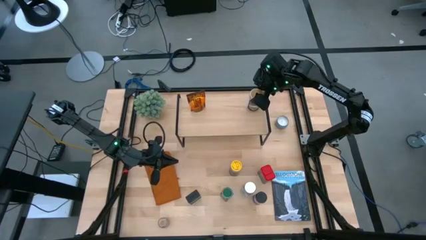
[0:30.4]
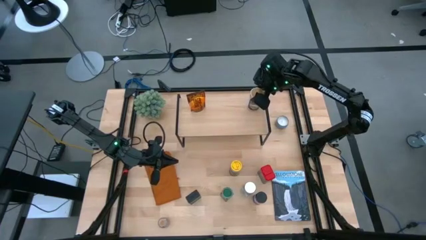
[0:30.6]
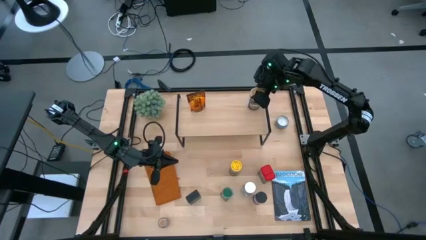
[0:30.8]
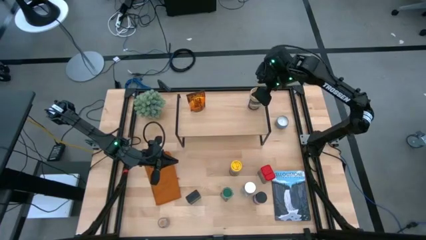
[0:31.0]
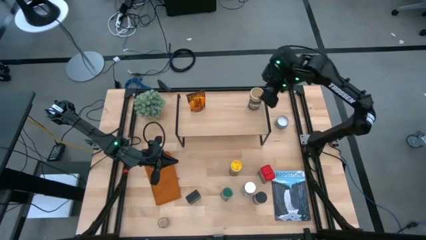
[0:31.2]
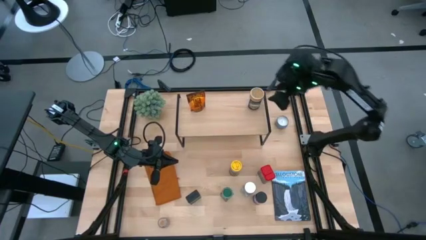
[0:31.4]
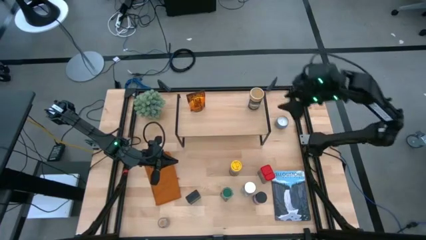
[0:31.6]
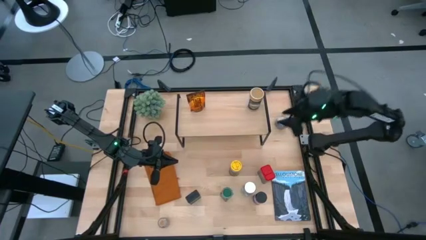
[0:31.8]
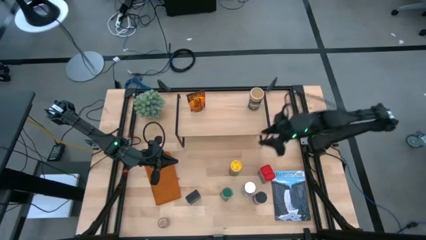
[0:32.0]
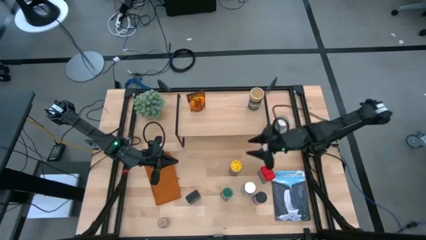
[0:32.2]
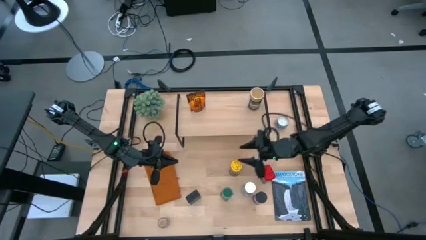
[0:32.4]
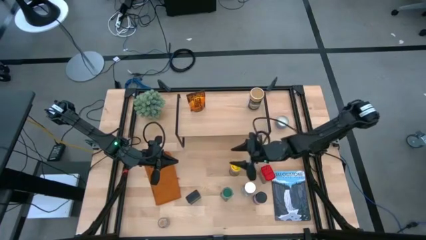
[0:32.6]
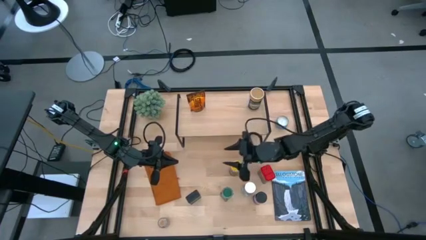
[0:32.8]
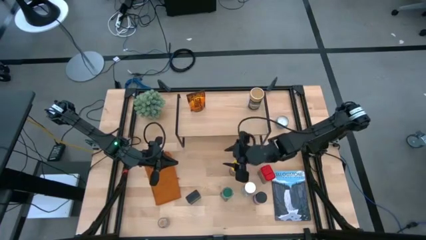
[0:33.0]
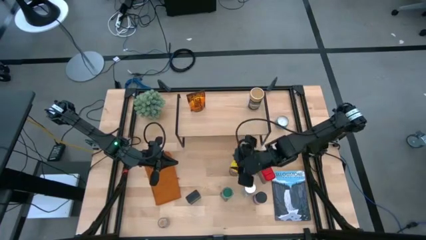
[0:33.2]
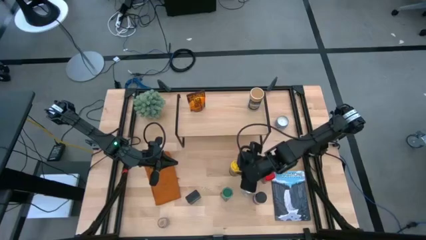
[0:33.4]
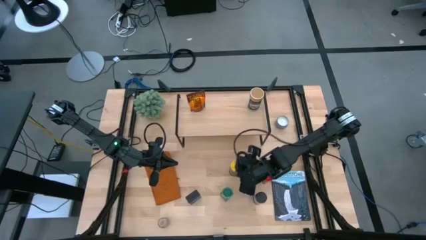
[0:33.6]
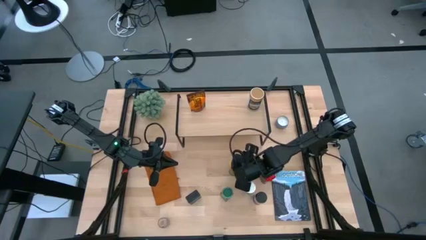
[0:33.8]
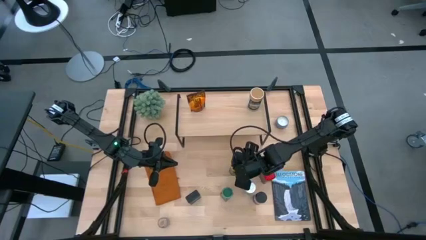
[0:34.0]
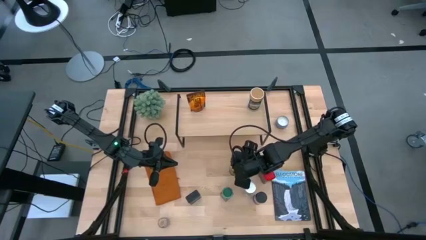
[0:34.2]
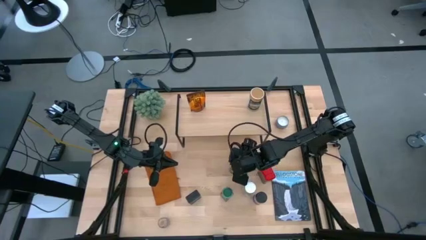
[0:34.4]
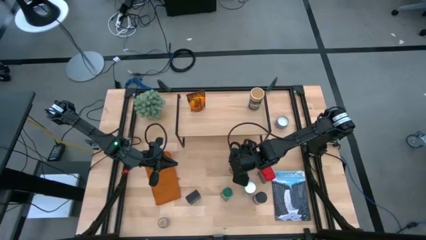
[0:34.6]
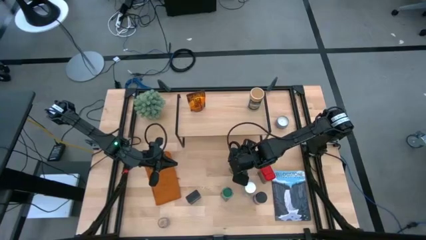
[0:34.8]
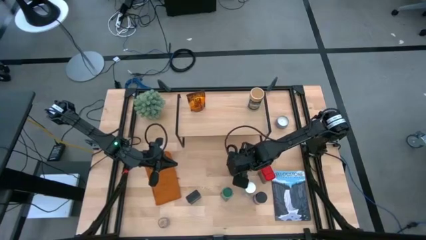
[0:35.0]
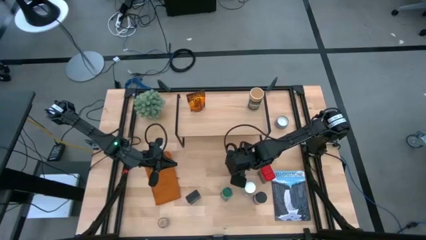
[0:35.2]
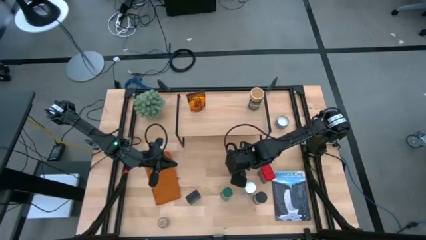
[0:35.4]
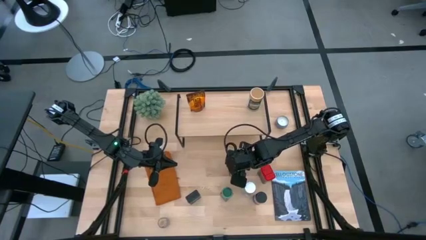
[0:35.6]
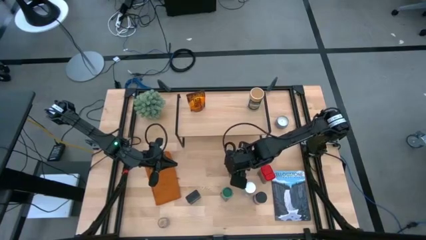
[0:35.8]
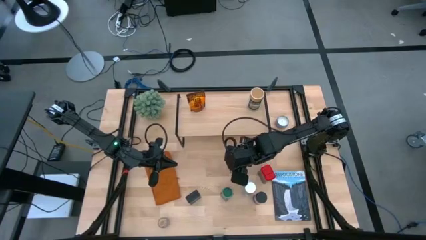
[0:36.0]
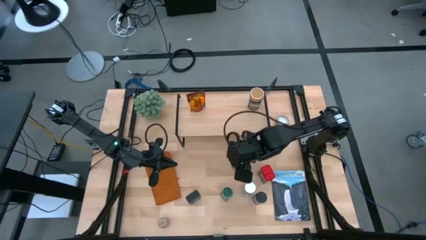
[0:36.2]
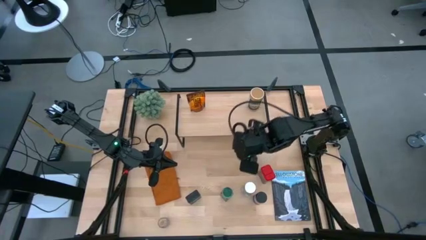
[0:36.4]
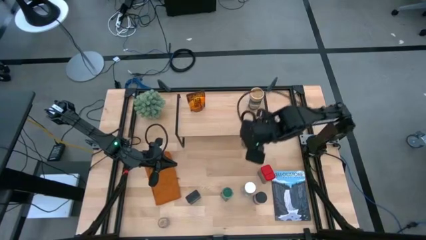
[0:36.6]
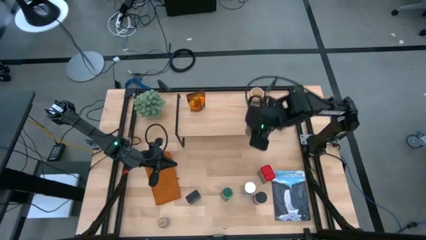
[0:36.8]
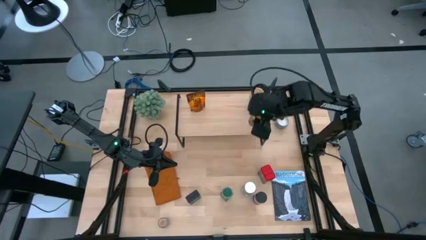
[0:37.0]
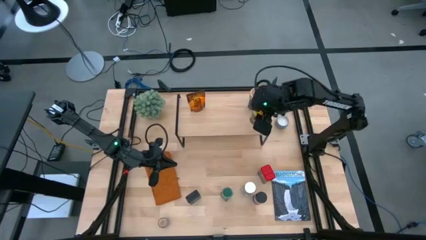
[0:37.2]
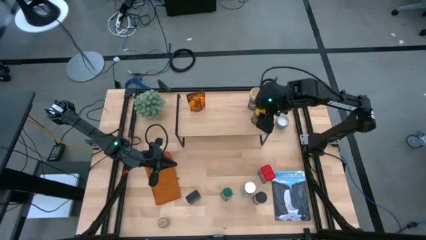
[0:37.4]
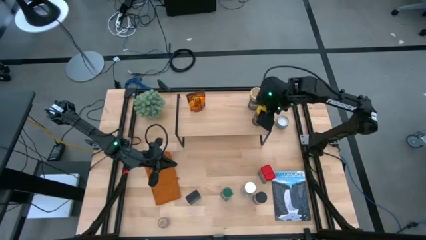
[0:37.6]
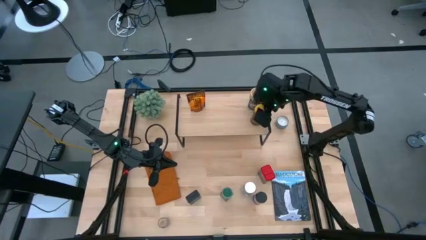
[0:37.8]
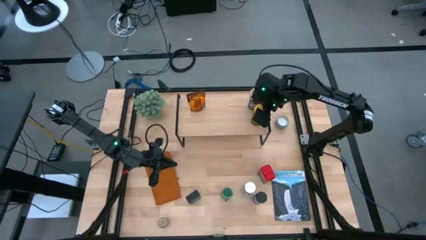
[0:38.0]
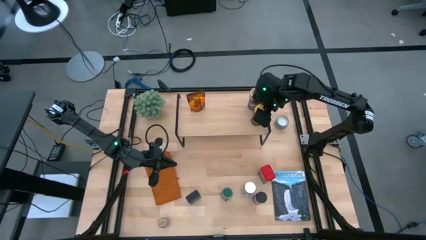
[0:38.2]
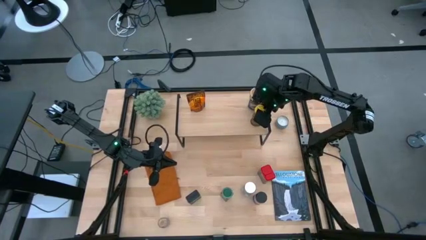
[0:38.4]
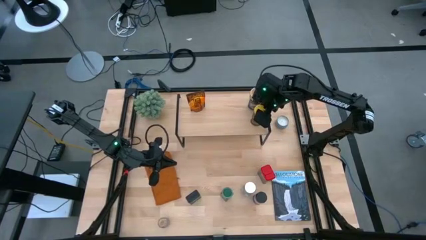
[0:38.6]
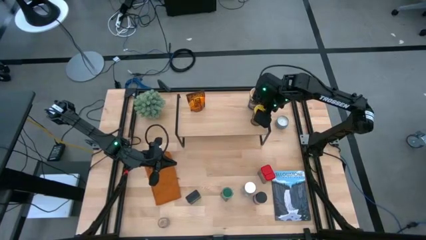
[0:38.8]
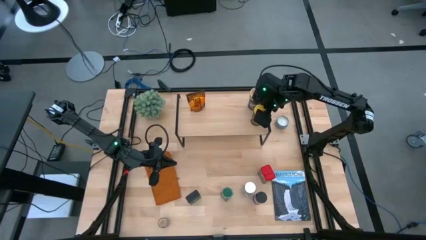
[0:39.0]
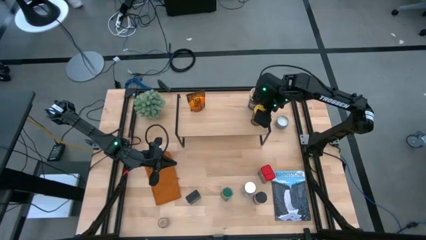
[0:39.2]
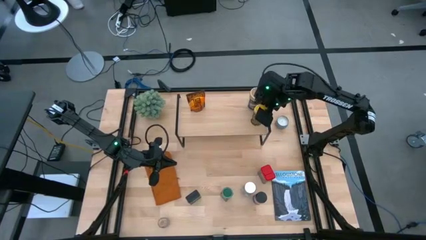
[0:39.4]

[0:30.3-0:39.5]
Task: Shelf spices
Put the yellow seasoning bottle on the shelf

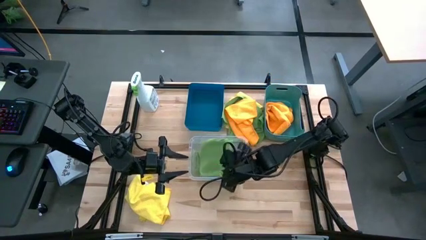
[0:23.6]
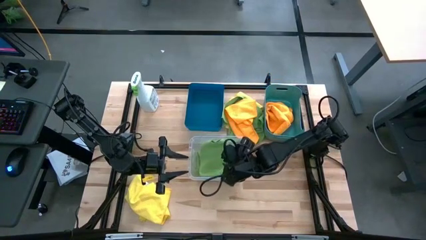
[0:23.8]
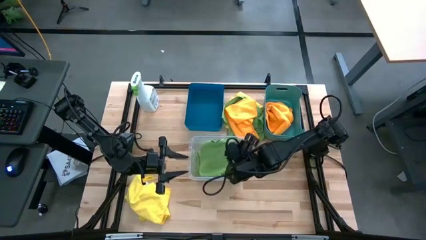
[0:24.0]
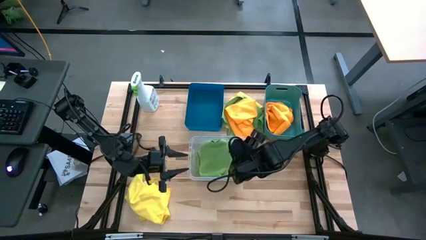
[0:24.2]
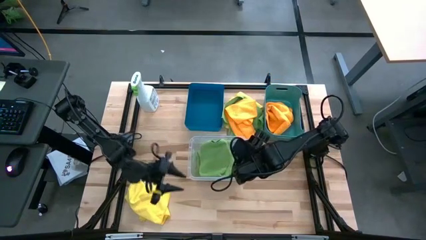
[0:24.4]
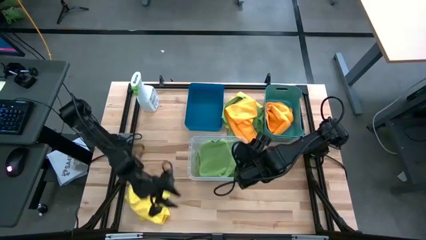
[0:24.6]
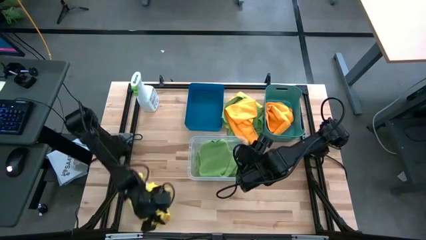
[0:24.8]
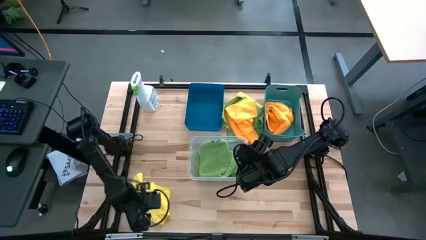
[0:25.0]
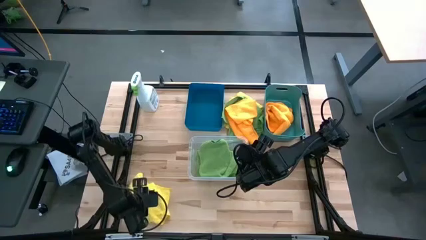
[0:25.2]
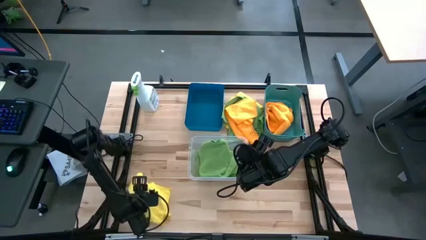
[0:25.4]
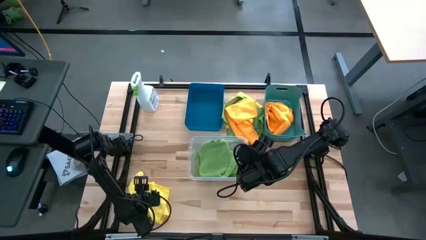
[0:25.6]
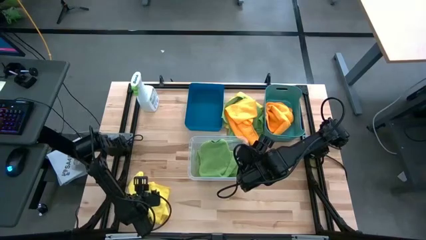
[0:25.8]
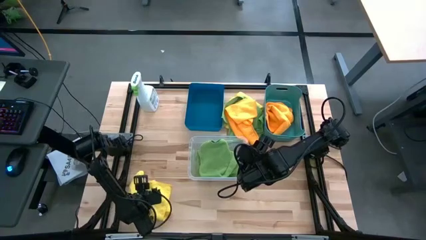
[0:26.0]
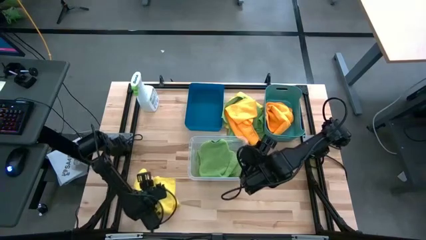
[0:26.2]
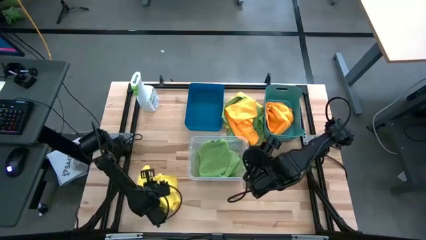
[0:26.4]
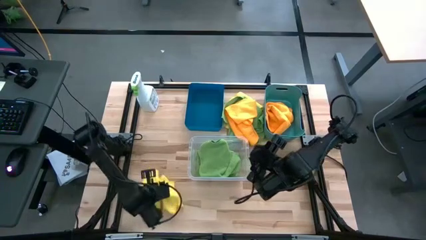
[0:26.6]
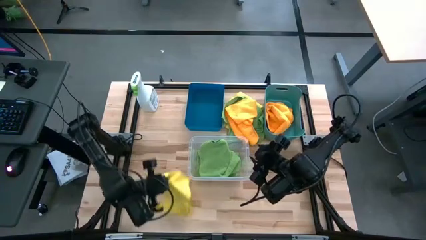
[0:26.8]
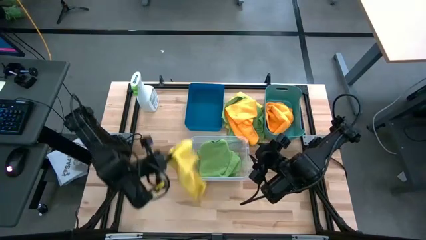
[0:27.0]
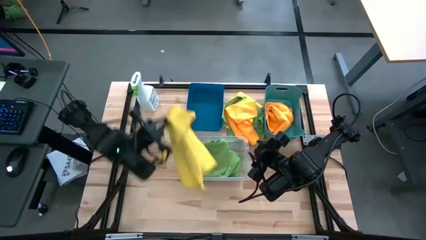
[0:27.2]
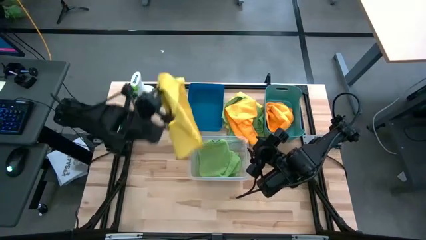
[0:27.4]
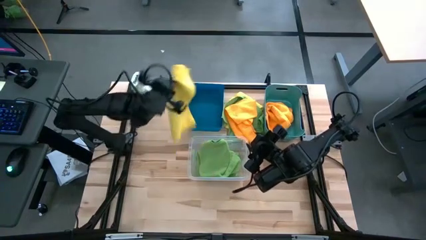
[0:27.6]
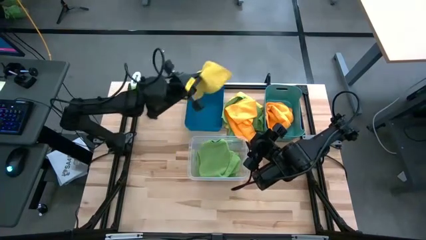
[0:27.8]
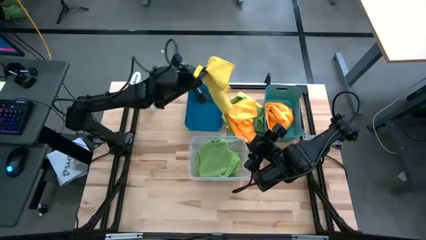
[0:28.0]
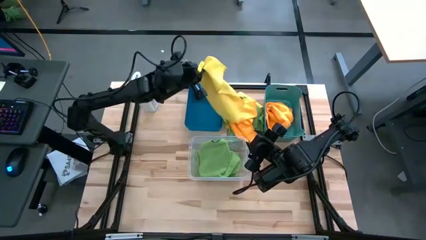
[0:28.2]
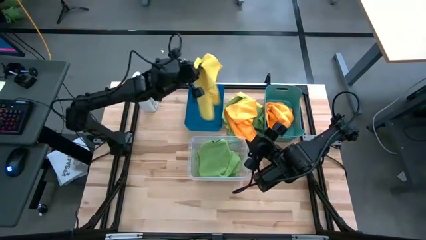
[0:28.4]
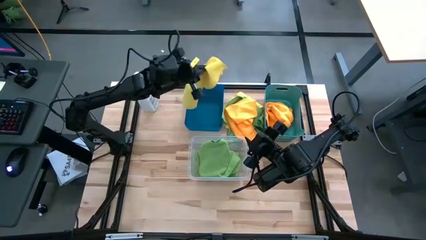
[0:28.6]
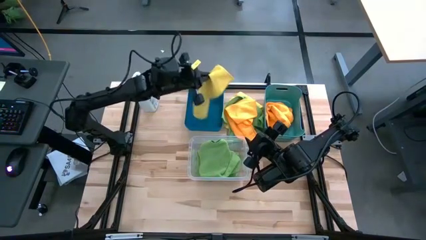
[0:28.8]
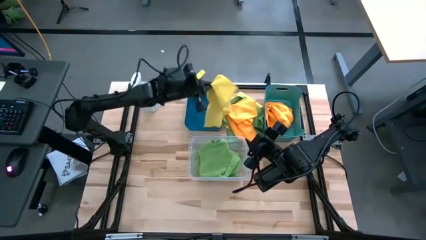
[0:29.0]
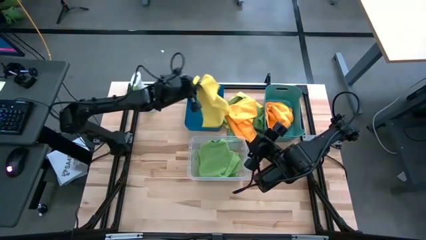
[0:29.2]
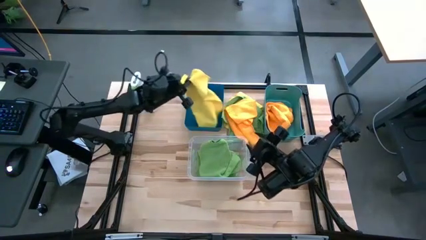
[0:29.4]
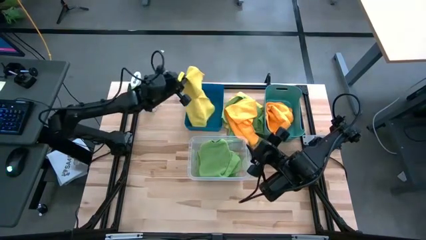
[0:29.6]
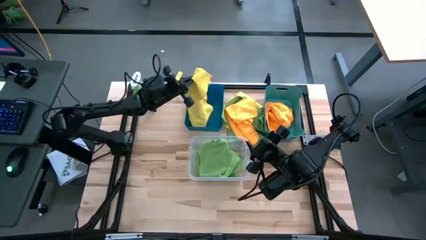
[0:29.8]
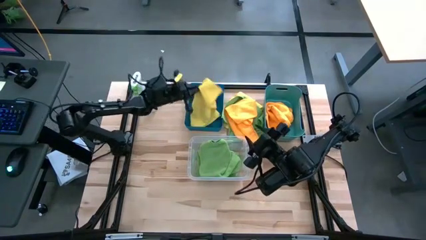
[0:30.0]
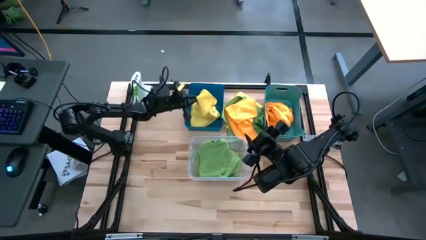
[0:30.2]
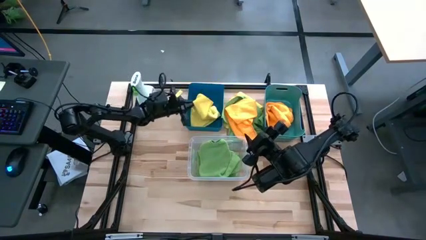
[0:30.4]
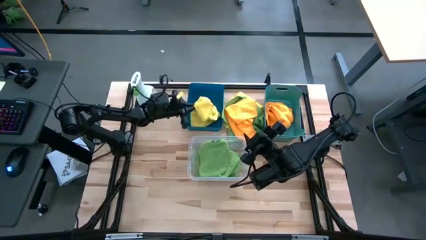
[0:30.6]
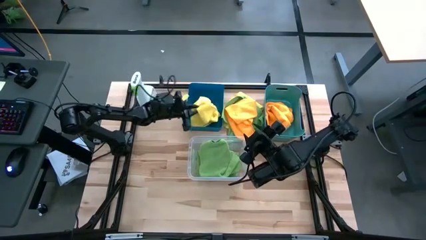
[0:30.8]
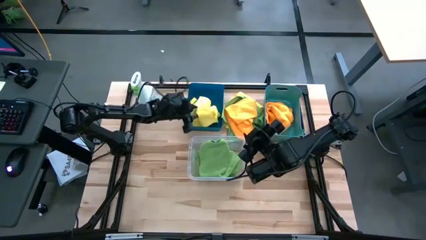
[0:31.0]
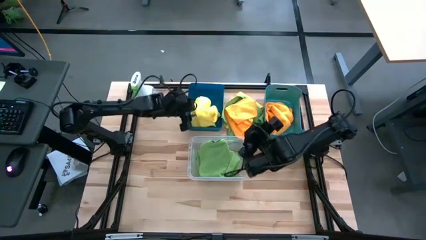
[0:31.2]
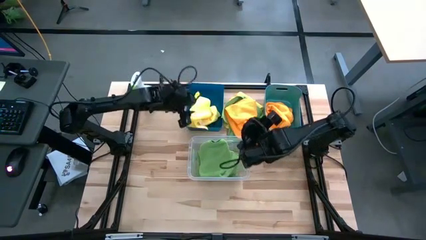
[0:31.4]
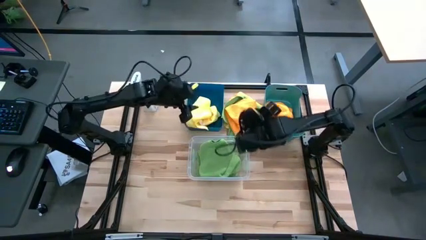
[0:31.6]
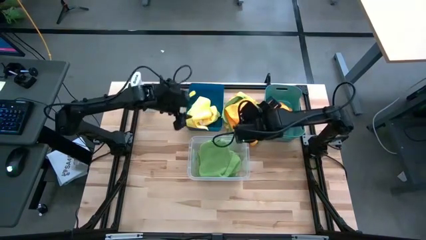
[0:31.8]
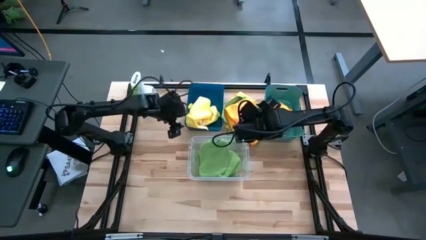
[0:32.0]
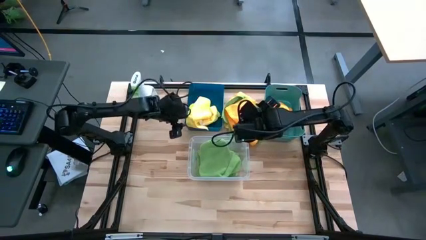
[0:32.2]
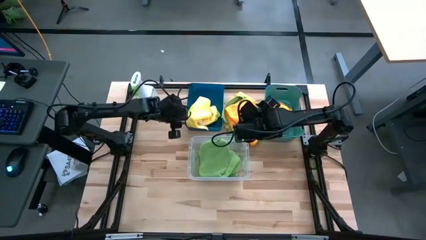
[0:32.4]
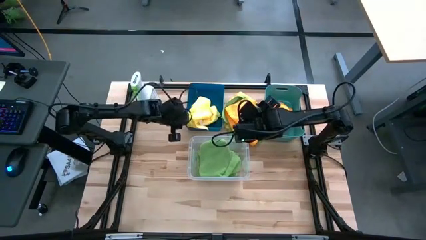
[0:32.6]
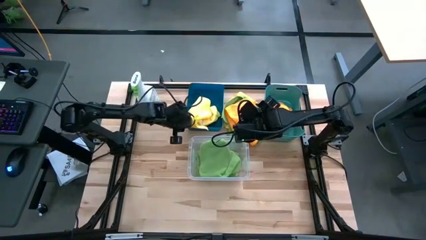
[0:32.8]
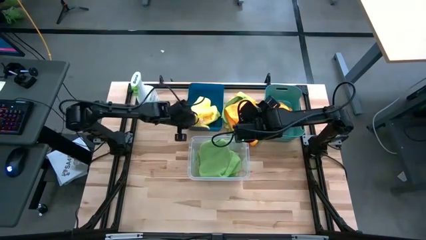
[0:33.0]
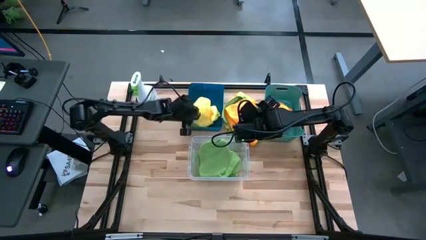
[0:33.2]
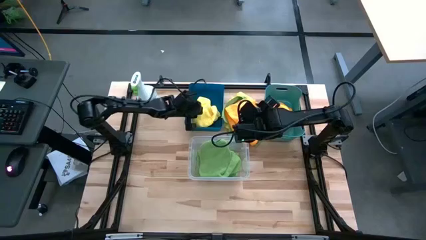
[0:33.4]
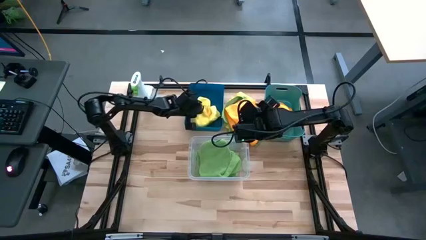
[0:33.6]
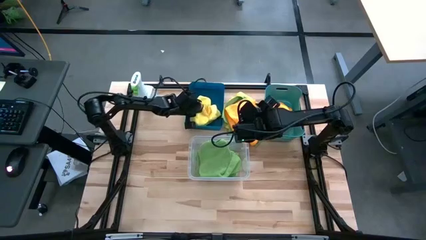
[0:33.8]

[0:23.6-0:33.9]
Task: Sort microfiber towel by color & place in baskets
Put the bottom yellow towel into the blue bin
